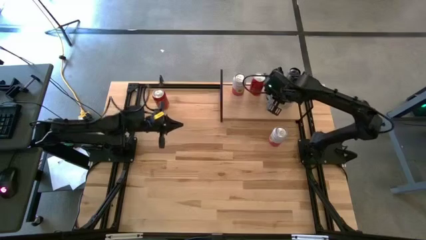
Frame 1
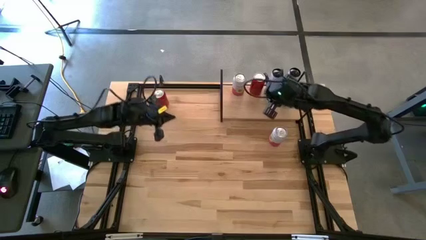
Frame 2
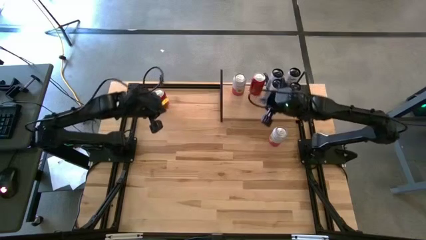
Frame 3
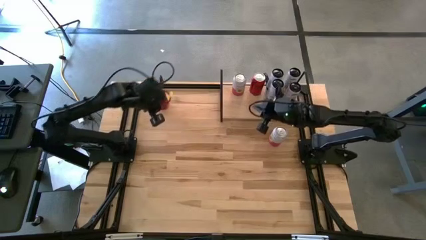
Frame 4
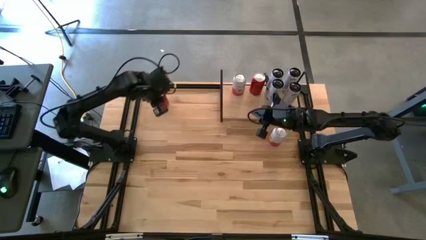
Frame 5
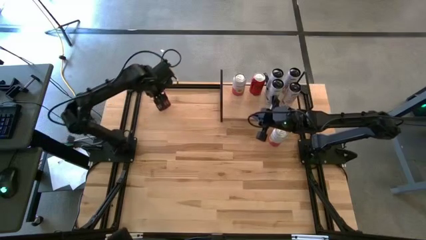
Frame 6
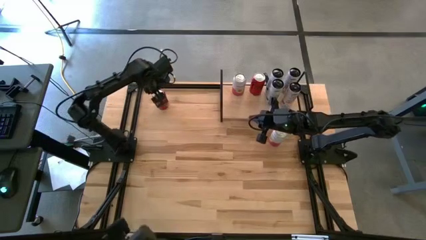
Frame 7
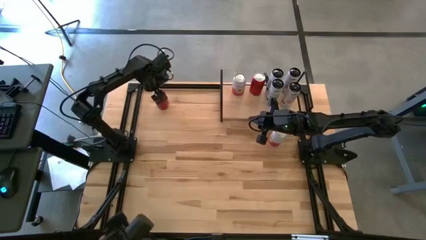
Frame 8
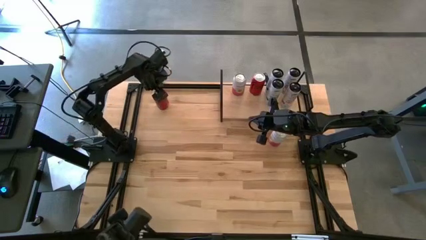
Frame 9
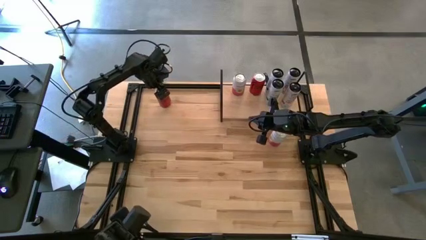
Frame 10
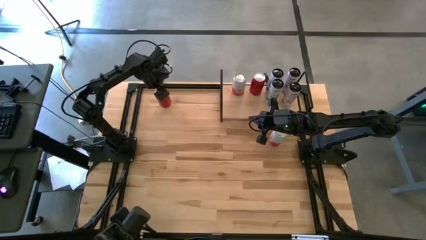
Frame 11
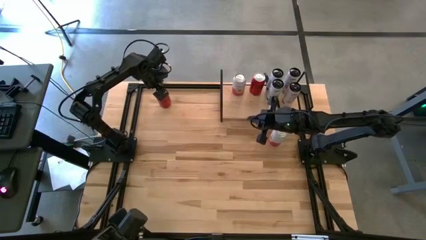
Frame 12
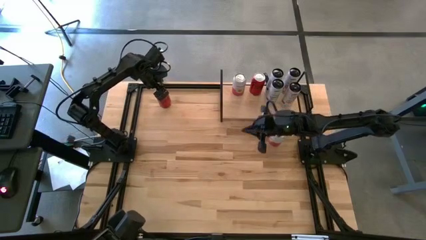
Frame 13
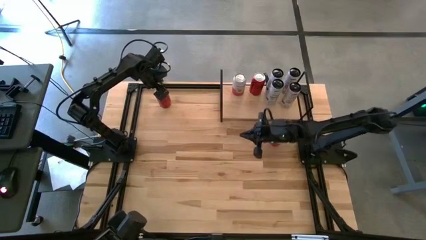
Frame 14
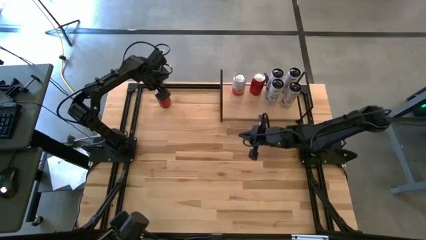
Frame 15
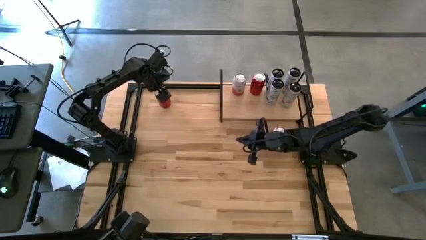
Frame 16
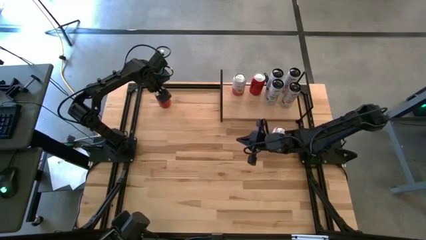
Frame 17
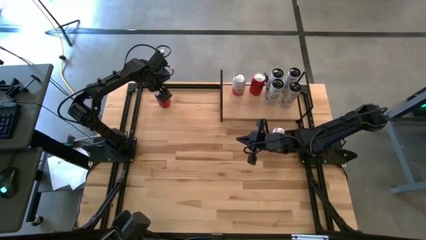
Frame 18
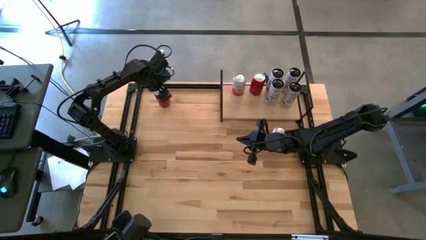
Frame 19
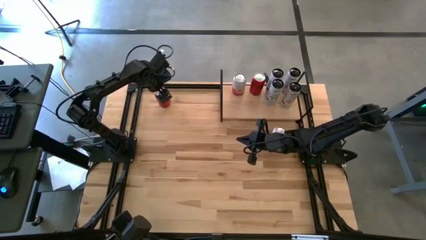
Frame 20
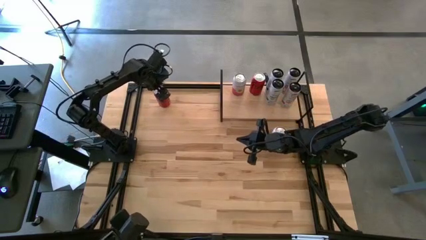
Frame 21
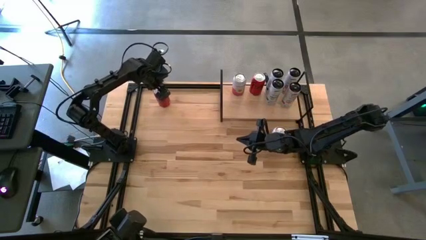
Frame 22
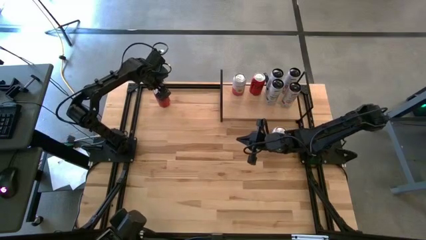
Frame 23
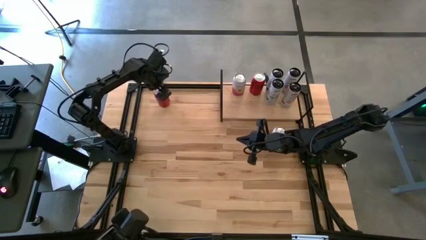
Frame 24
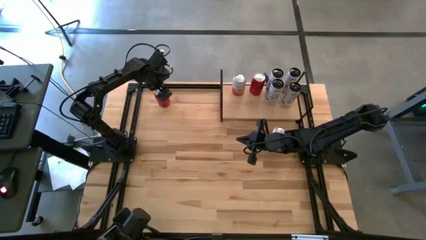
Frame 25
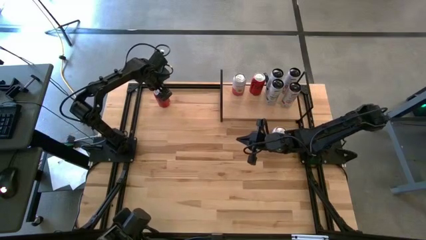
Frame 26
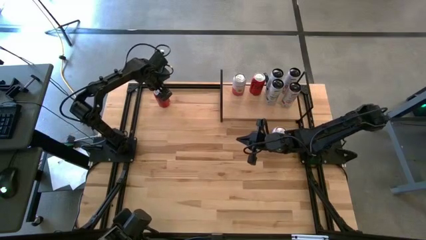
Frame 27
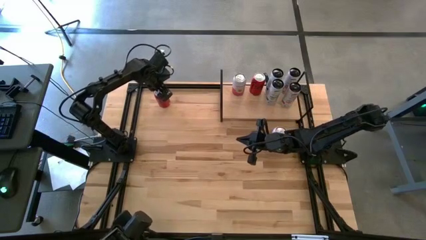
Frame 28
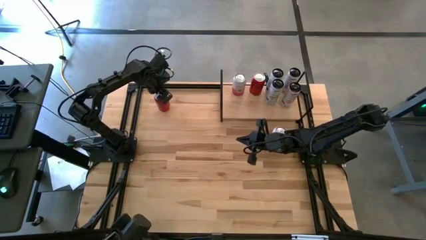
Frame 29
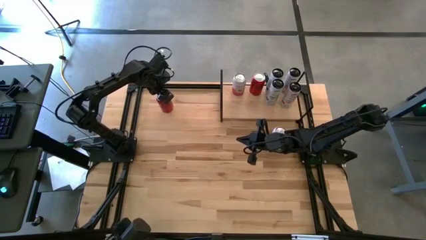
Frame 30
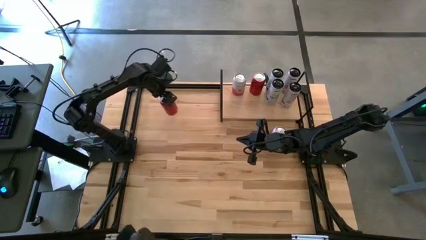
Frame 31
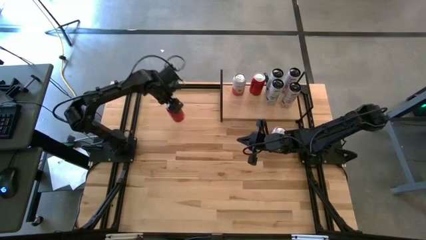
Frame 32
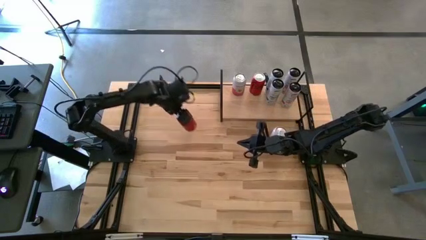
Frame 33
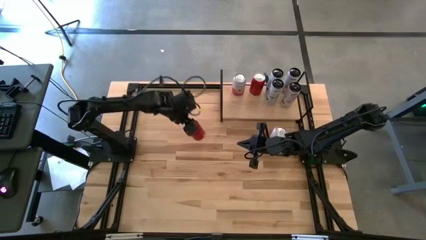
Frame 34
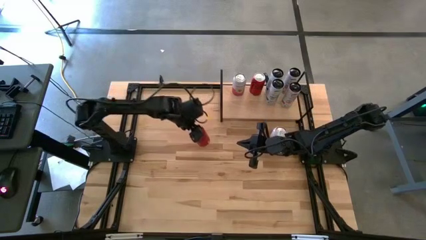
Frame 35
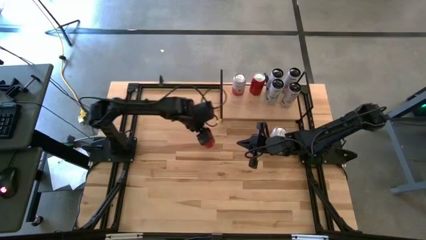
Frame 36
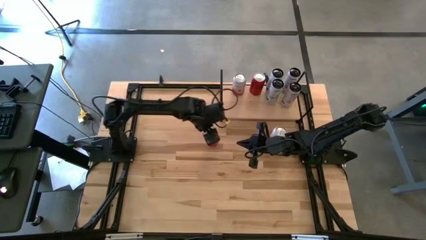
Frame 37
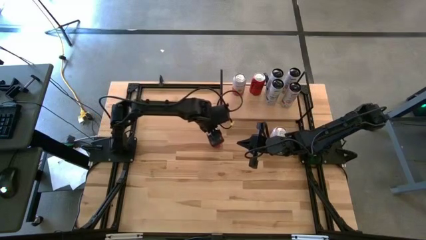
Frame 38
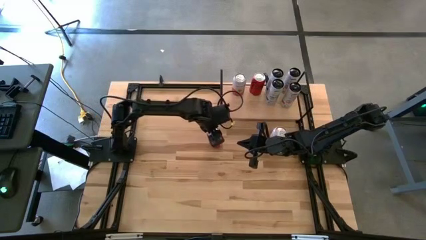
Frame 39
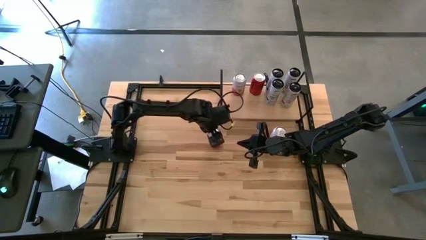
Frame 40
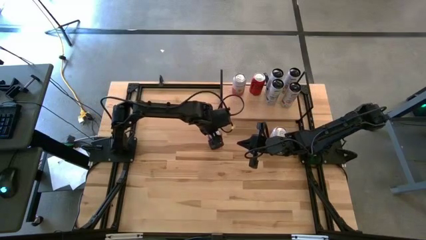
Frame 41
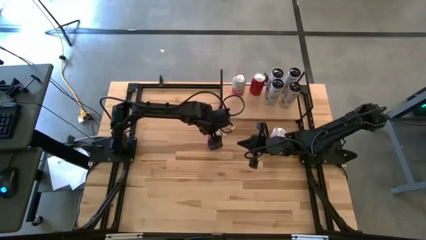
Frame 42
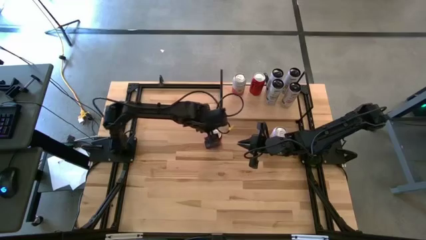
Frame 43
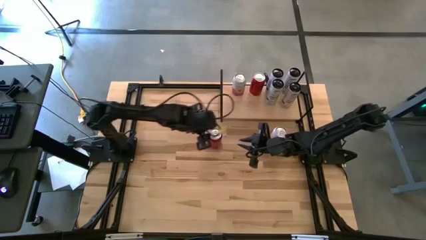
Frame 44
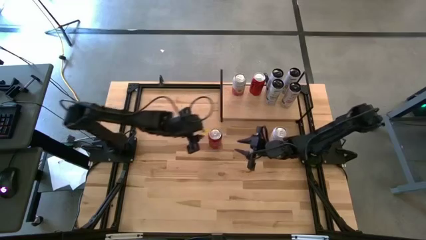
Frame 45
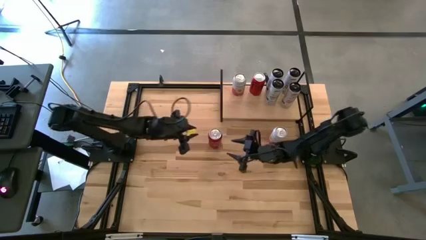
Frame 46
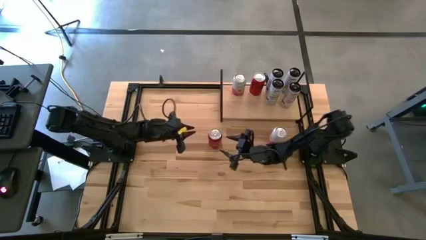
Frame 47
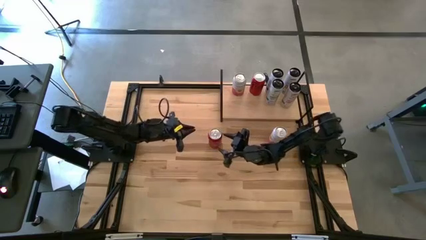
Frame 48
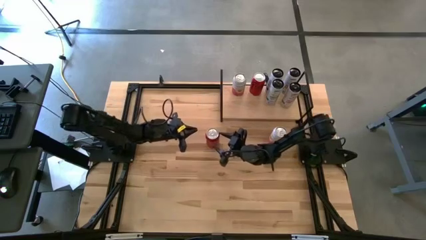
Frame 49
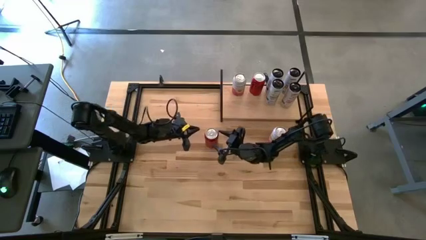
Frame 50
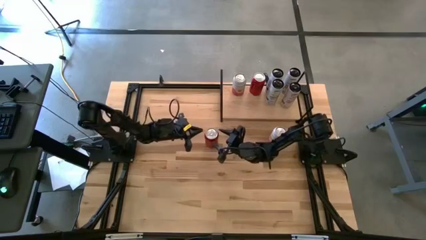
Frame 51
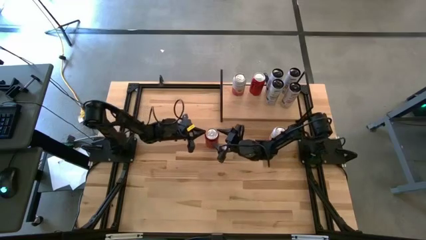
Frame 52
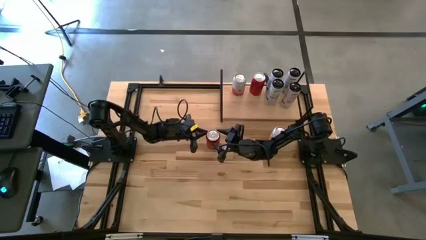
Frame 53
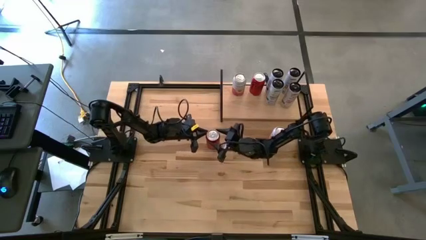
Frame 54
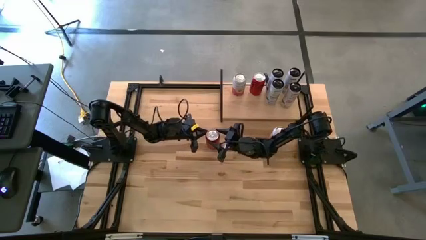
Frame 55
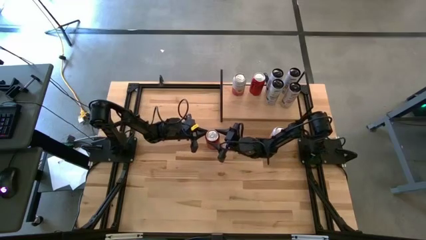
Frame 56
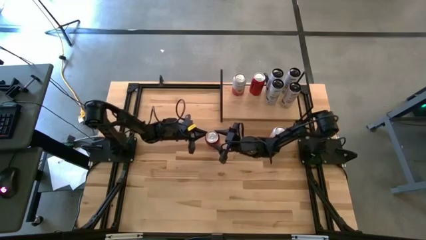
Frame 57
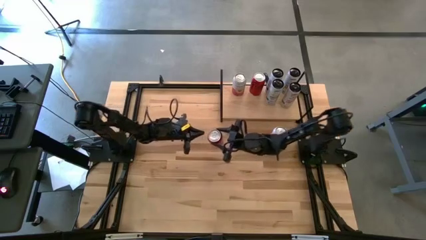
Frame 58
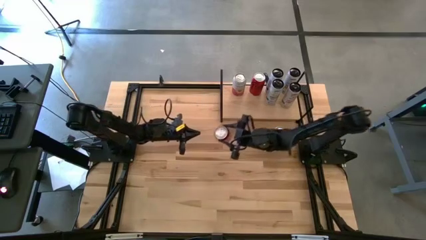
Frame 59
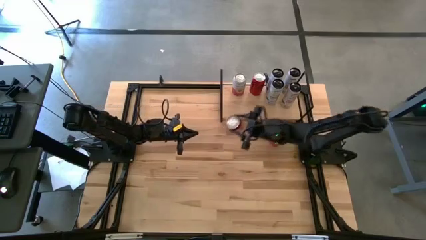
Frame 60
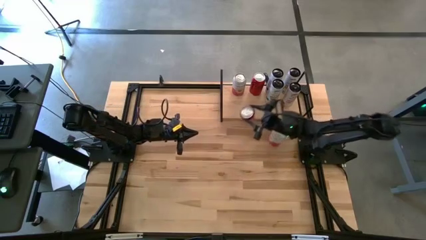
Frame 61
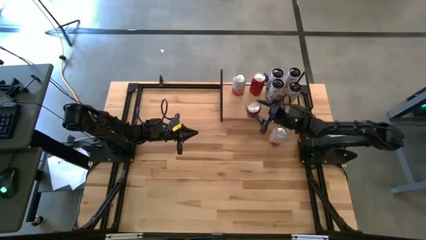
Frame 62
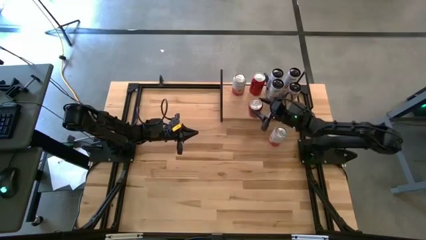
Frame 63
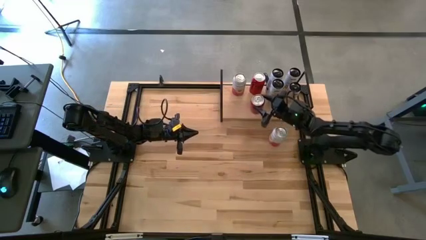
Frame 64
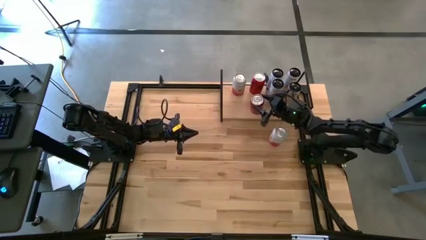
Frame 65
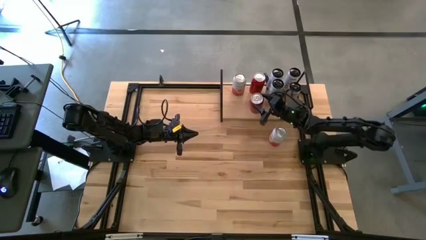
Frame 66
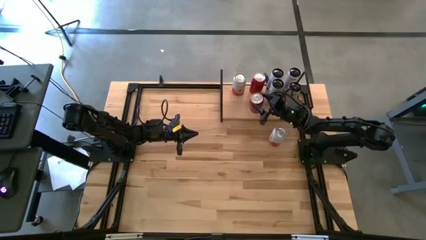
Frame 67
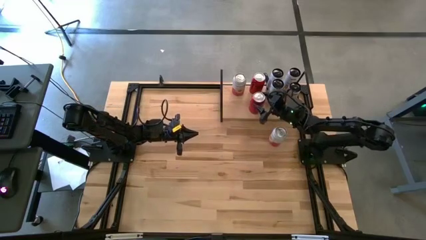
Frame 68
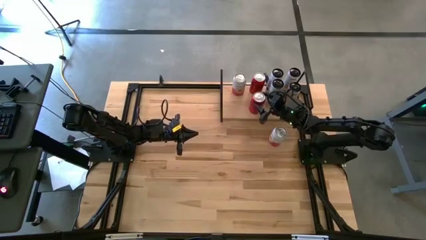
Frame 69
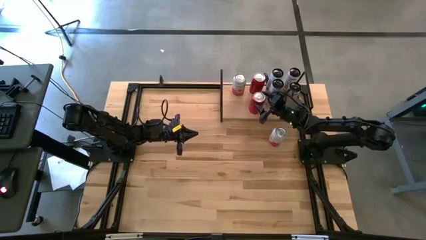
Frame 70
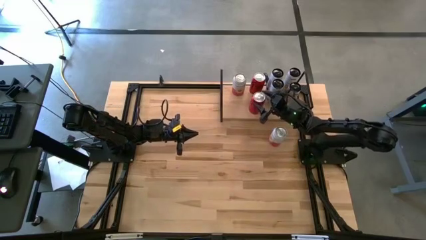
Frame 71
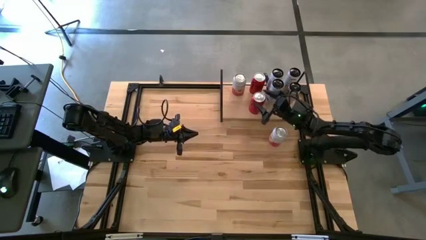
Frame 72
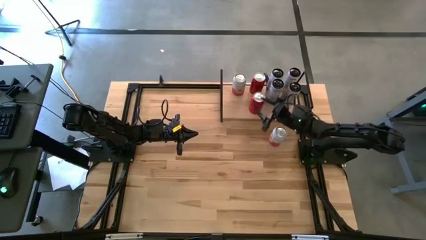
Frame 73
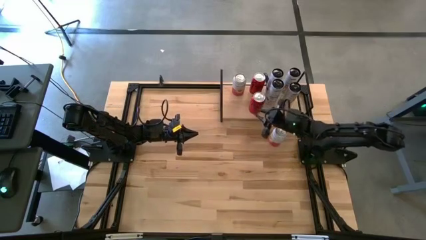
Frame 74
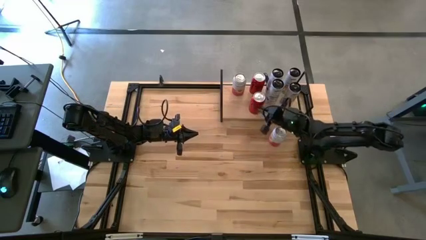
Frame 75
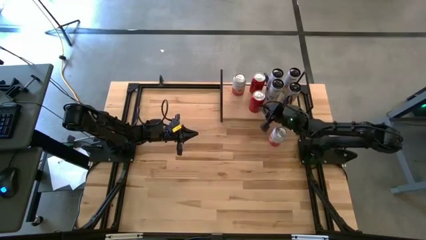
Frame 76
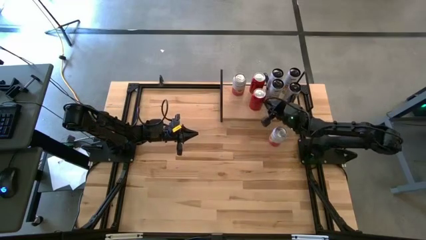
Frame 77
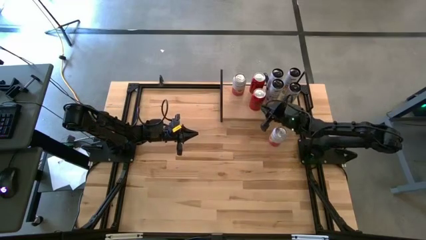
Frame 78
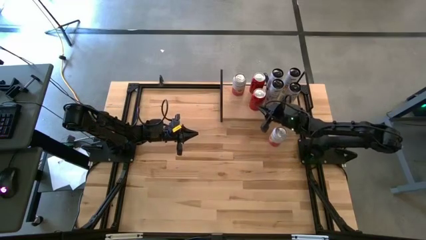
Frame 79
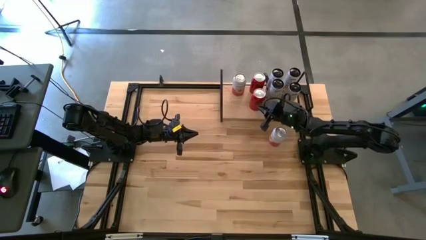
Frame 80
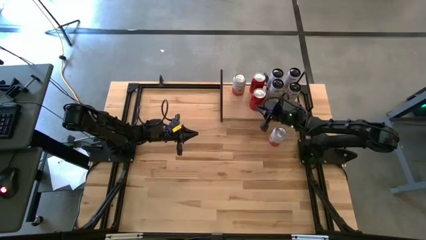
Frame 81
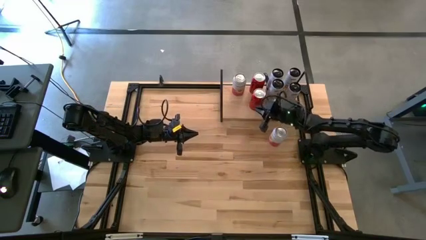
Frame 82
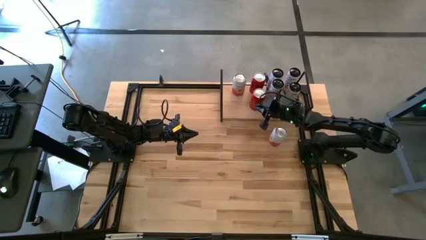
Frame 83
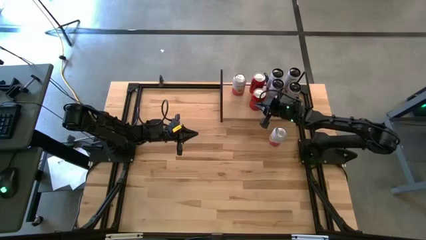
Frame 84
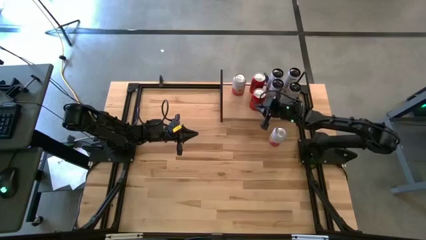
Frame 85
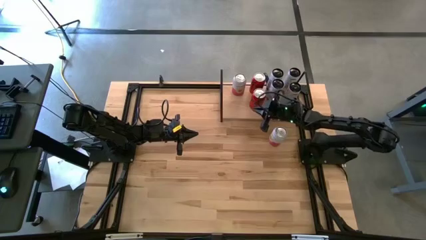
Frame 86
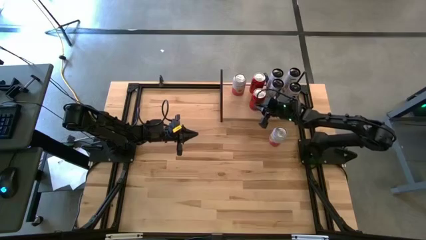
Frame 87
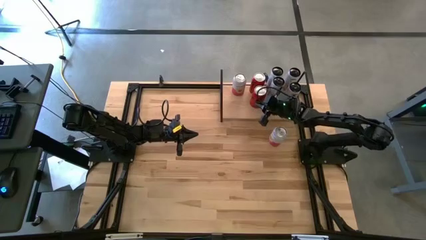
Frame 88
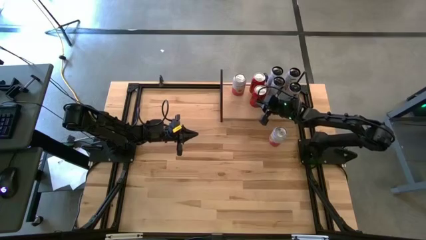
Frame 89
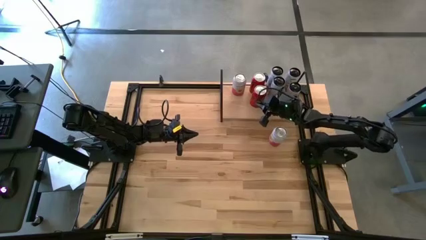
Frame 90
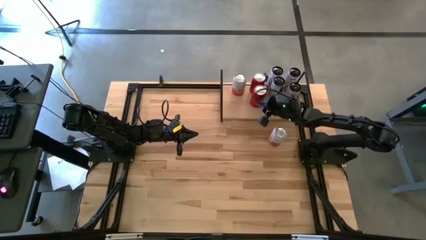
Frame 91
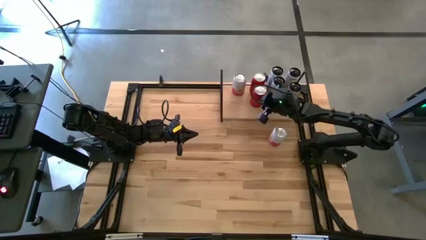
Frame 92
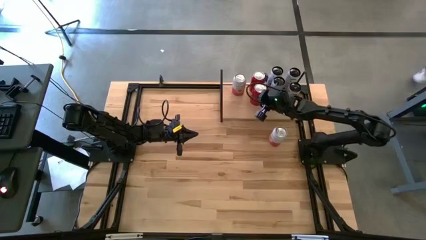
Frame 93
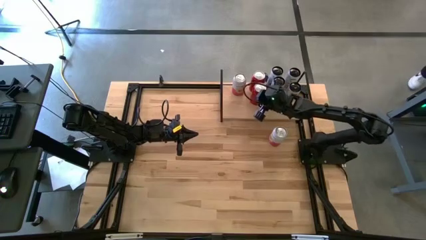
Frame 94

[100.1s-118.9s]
Task: Place canned beverage on shelf
Put the red soda can on the shelf aligned with the other red soda can
